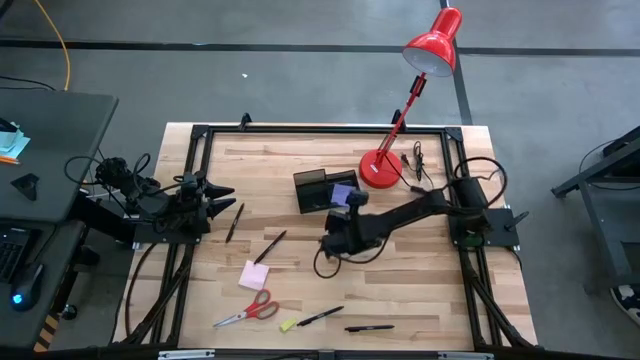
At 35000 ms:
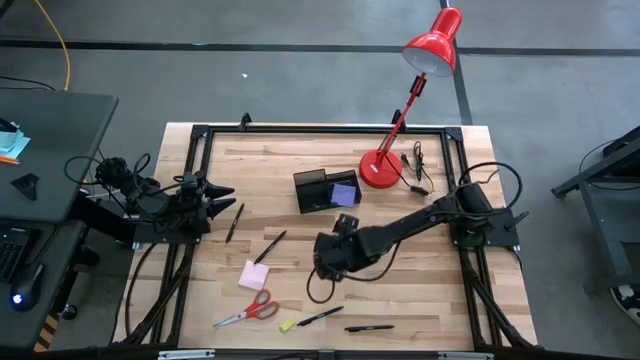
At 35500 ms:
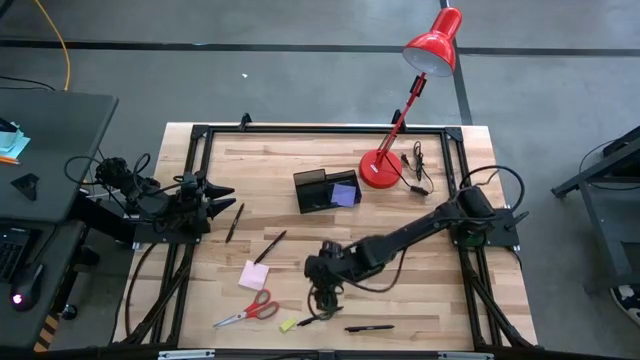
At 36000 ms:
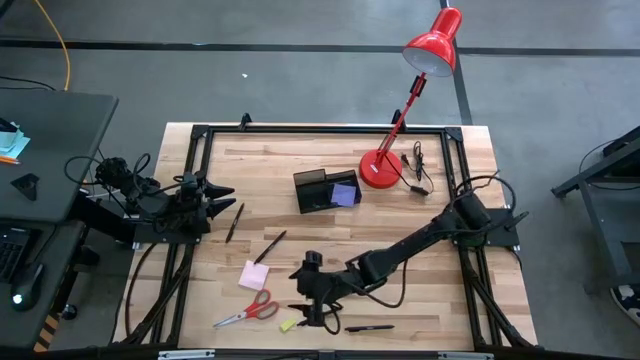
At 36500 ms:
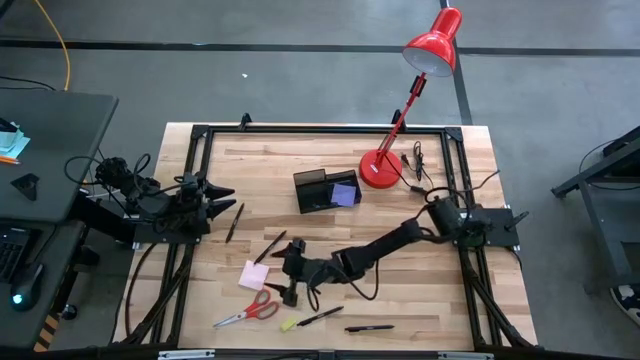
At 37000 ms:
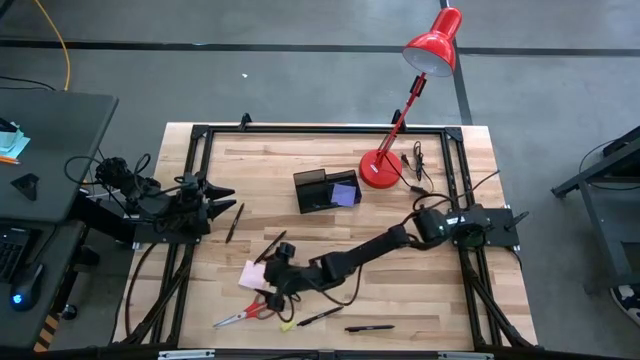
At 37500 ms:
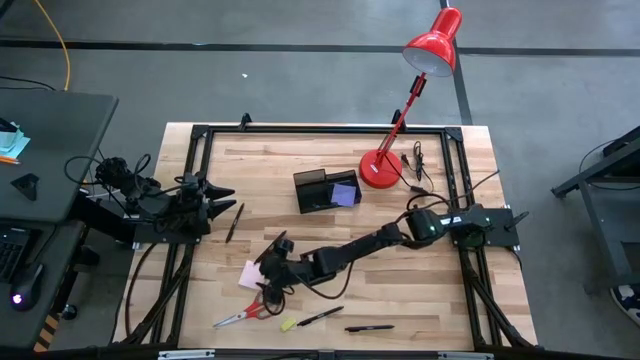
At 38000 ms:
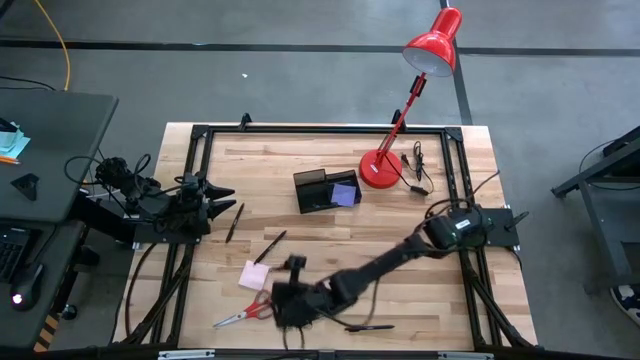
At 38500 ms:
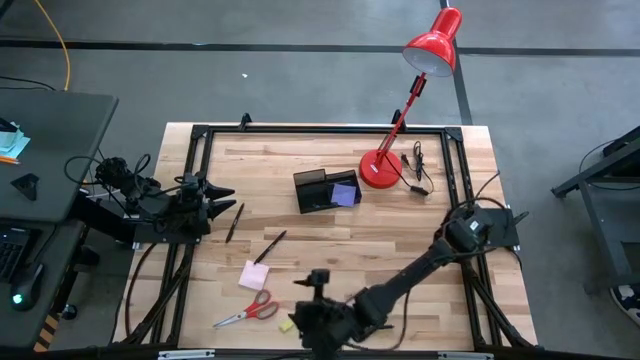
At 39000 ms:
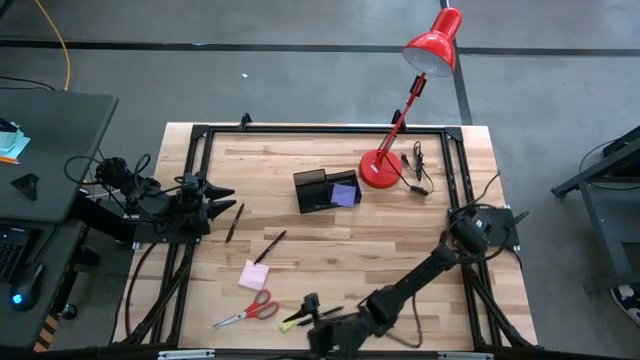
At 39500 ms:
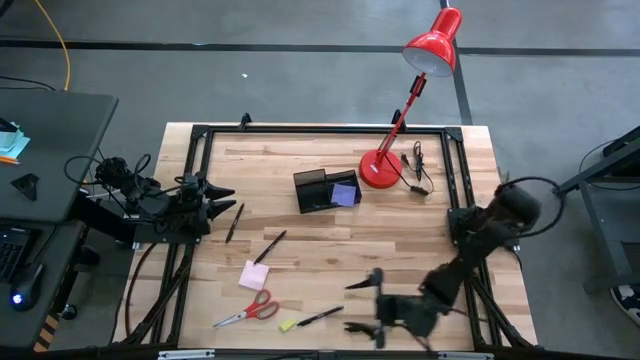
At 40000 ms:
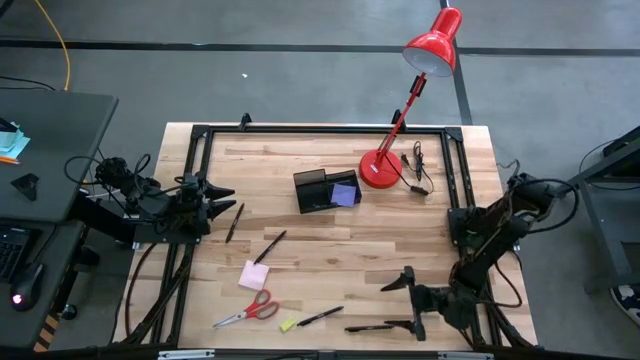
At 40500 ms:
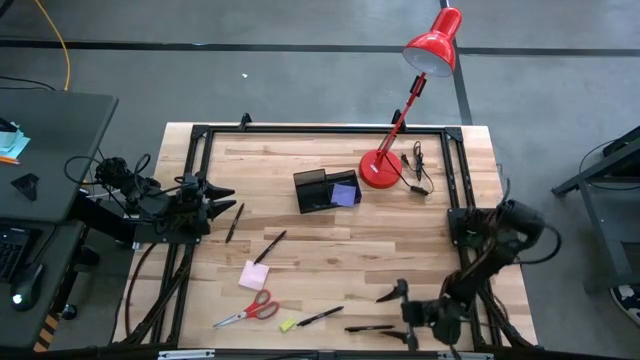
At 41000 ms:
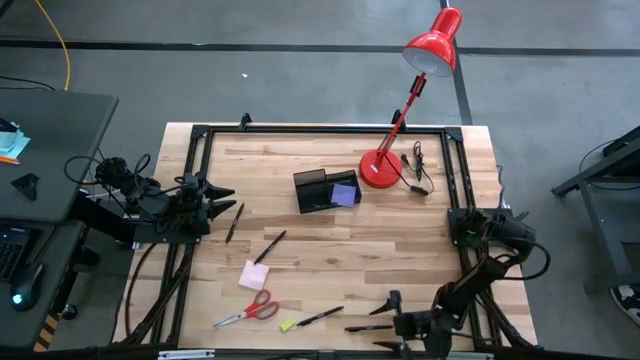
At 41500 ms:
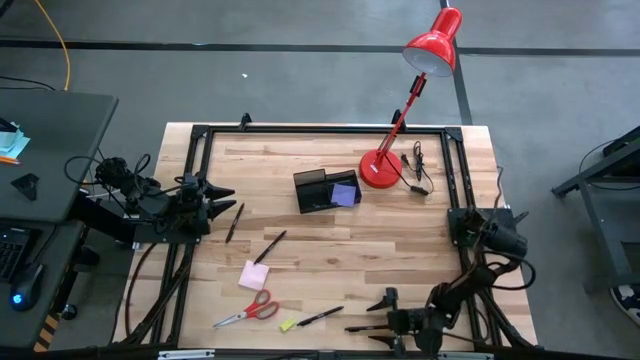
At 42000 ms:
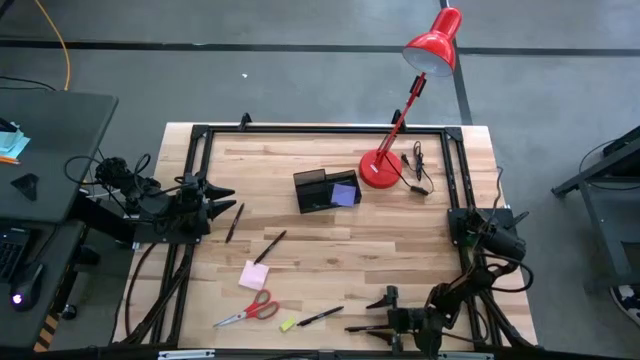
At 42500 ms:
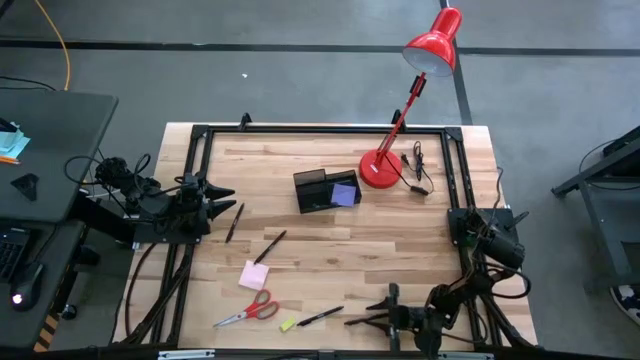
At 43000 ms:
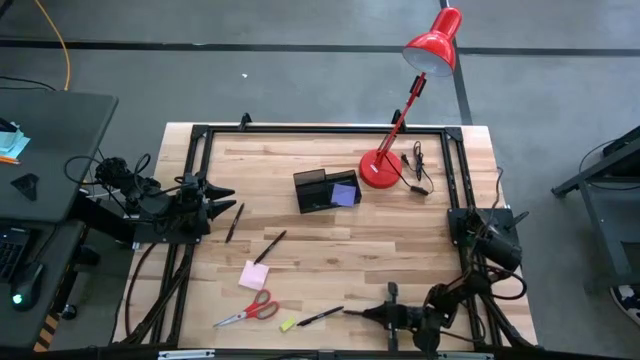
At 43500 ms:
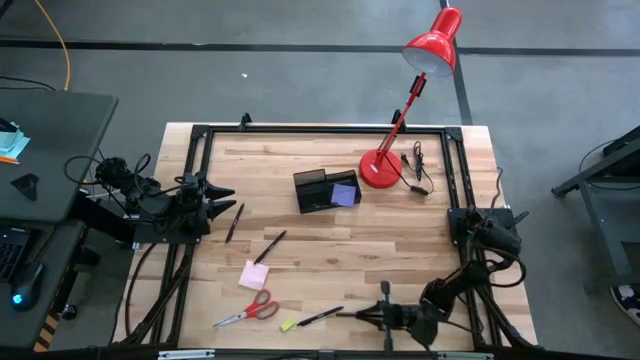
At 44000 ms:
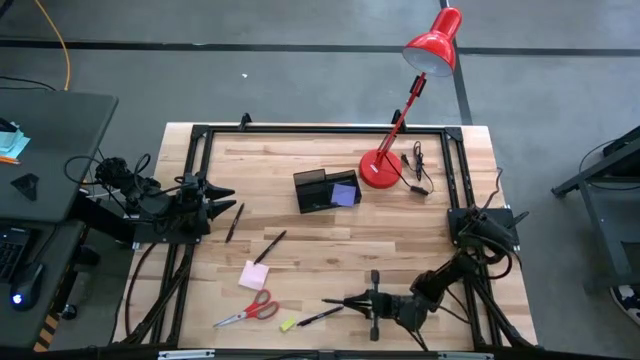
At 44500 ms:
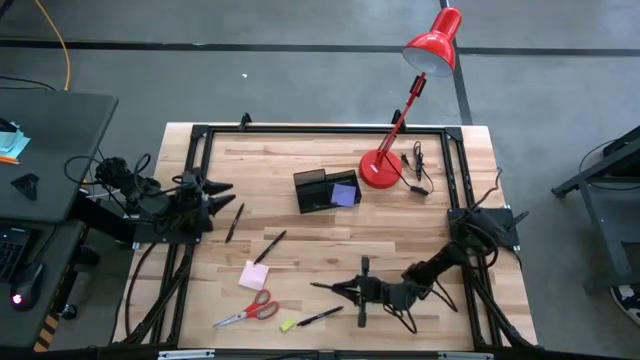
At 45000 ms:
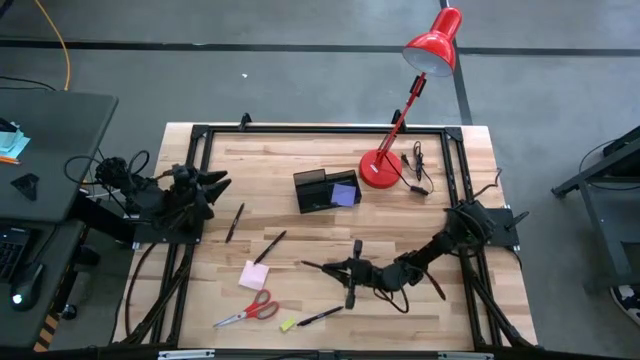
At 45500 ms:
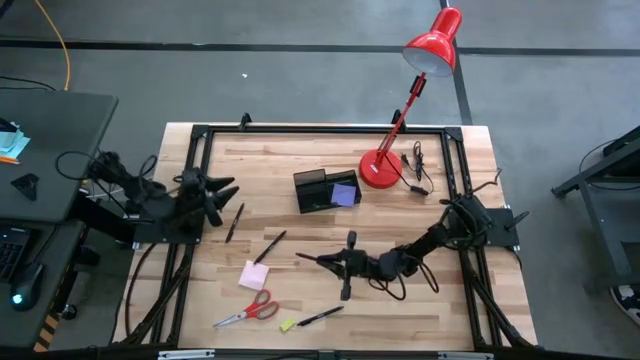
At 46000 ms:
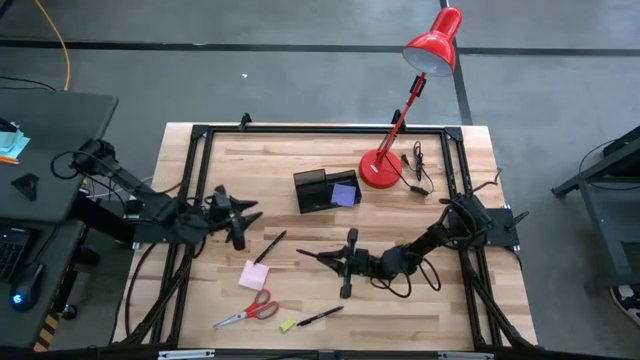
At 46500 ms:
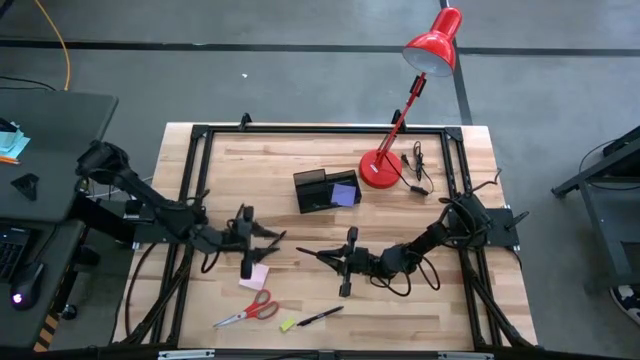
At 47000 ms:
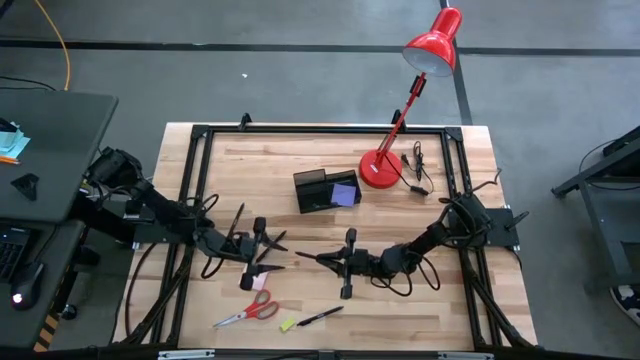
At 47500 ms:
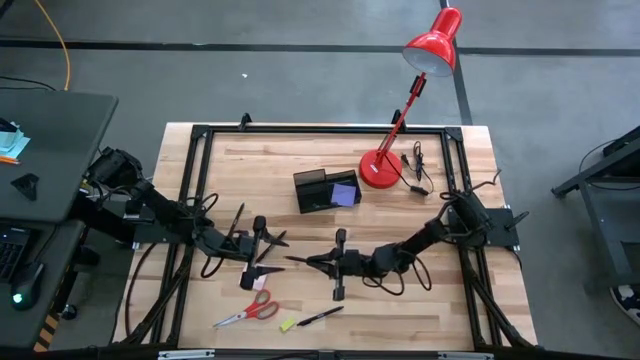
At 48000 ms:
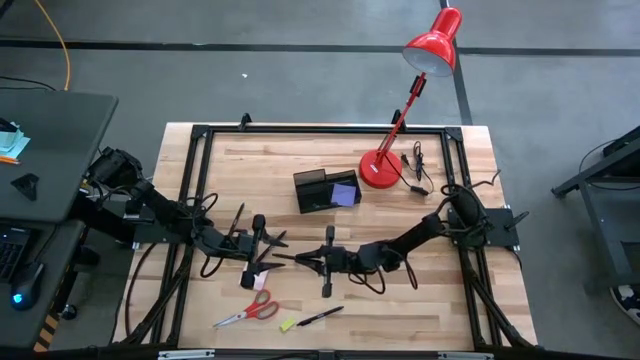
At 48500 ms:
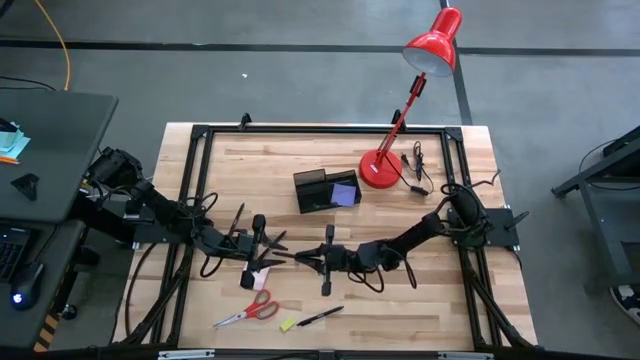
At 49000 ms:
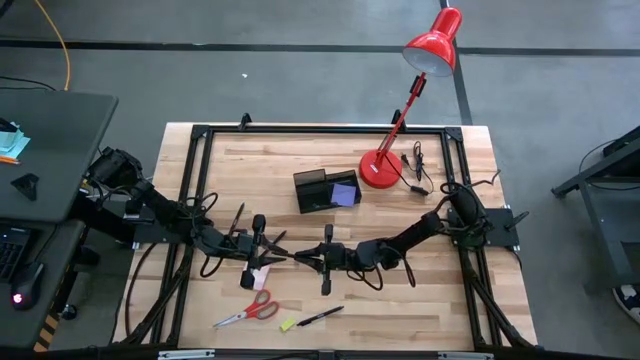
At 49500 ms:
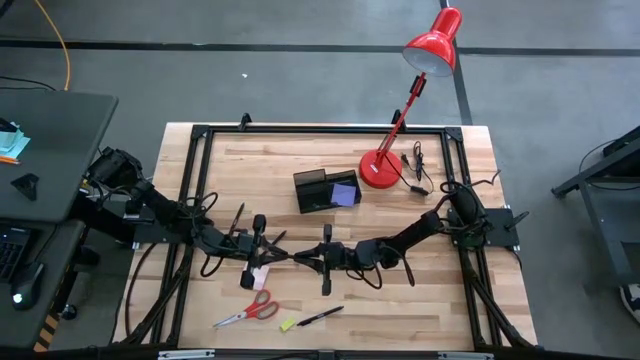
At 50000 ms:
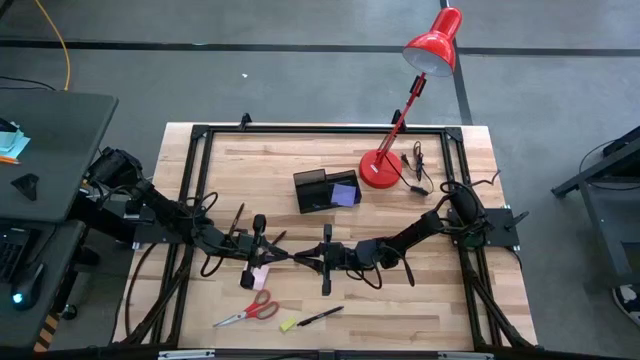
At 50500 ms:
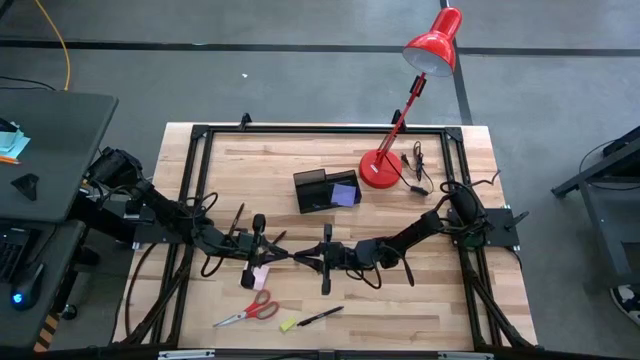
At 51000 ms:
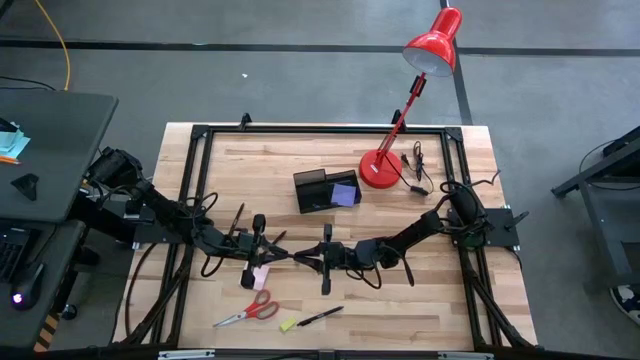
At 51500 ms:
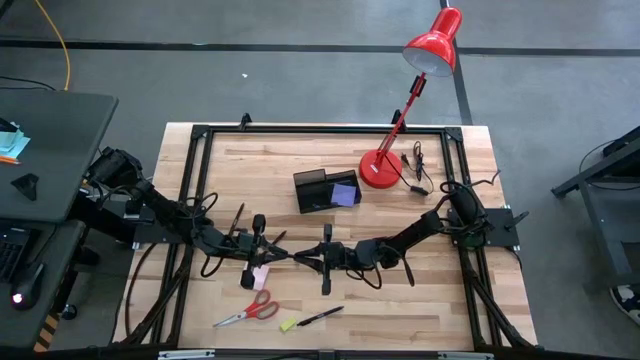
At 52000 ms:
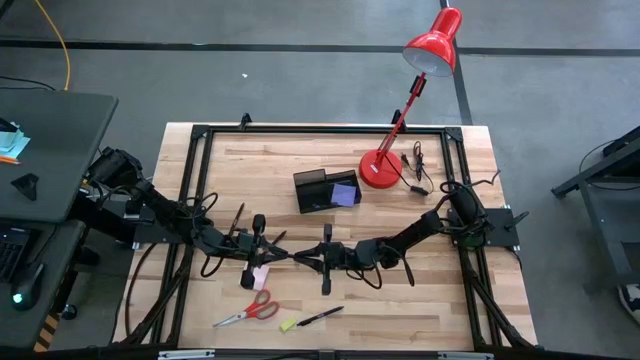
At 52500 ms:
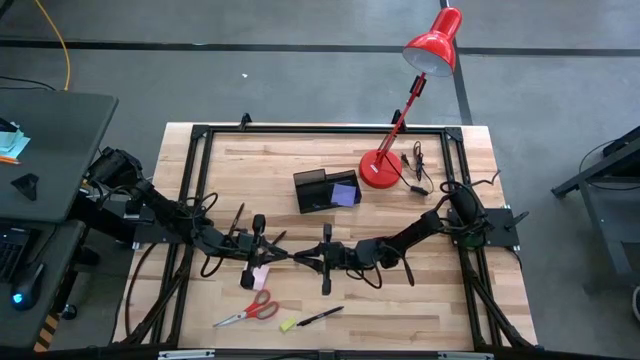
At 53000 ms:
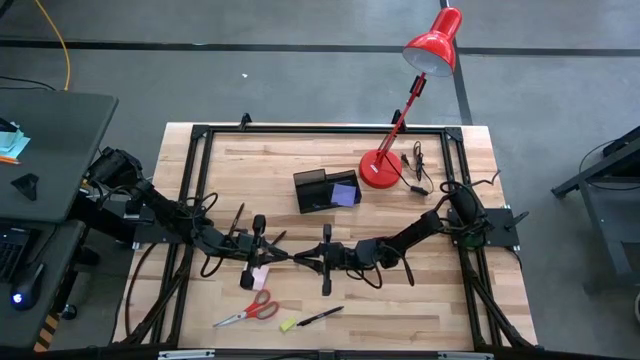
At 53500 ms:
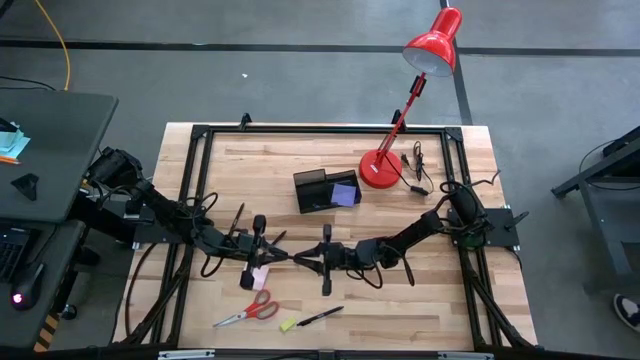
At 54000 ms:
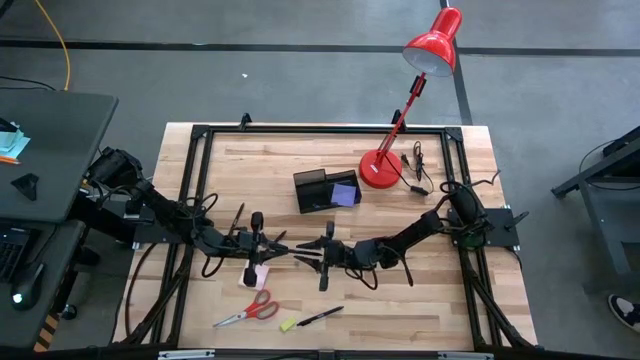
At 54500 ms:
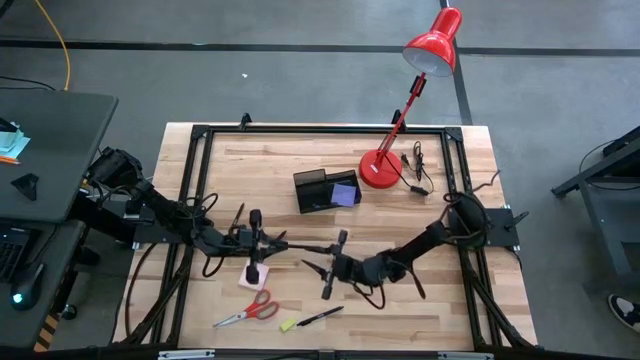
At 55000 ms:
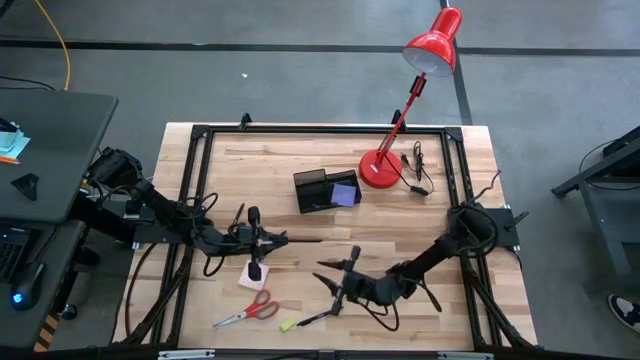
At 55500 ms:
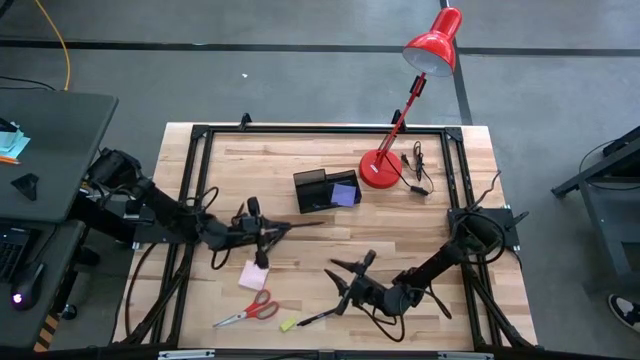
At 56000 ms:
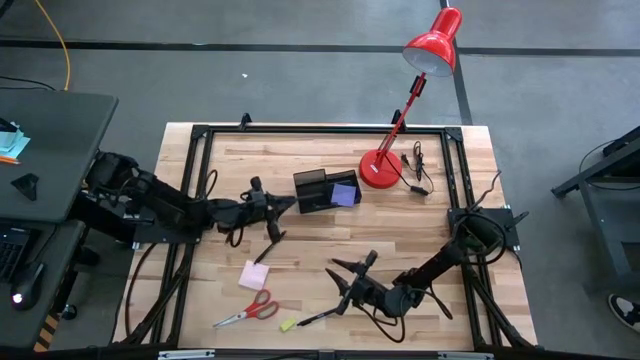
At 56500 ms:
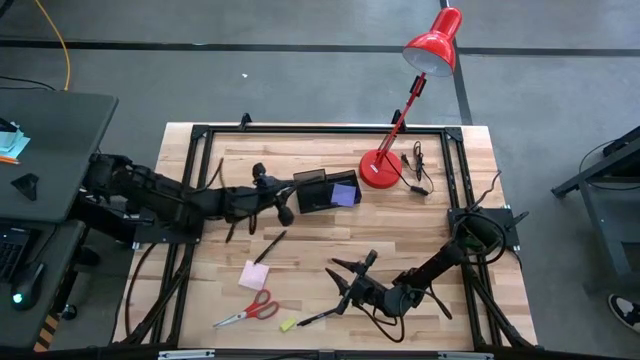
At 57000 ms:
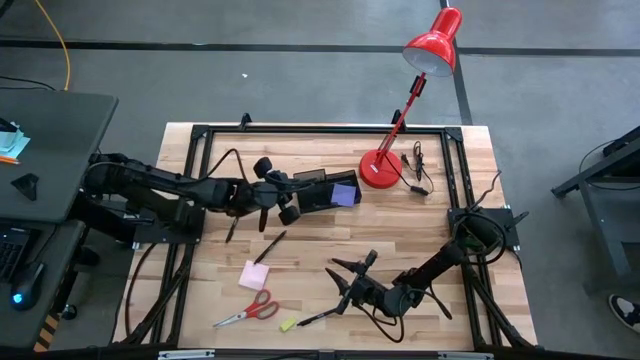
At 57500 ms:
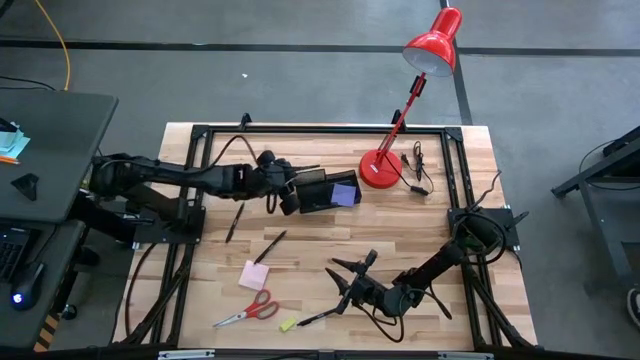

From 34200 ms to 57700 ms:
Task: Pick and place office supplies into organizer
Put the black pen into the black desk organizer
